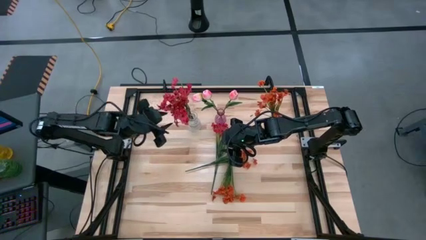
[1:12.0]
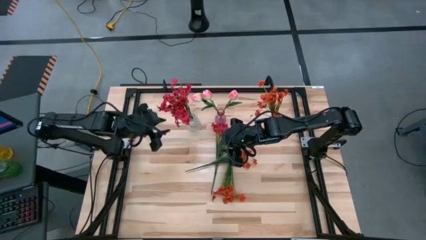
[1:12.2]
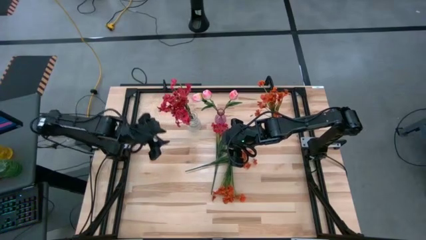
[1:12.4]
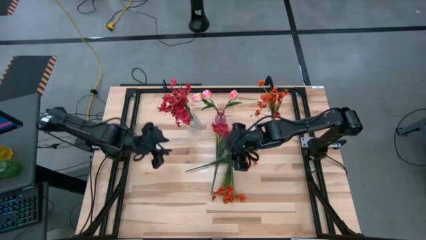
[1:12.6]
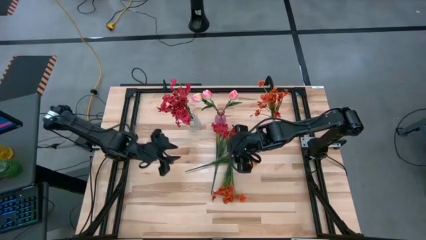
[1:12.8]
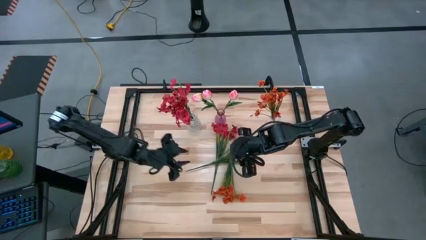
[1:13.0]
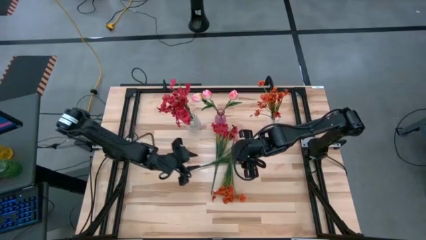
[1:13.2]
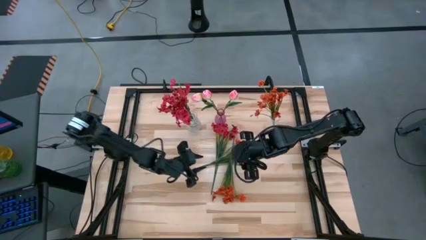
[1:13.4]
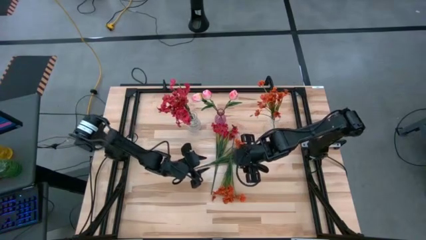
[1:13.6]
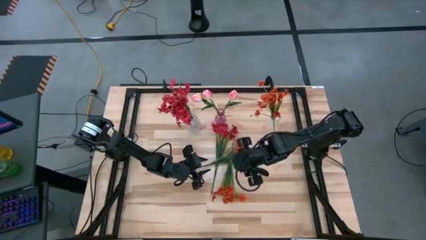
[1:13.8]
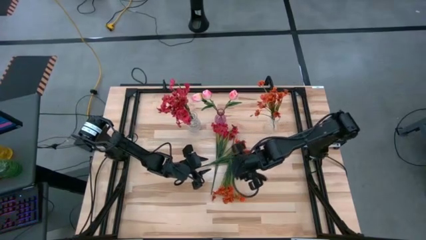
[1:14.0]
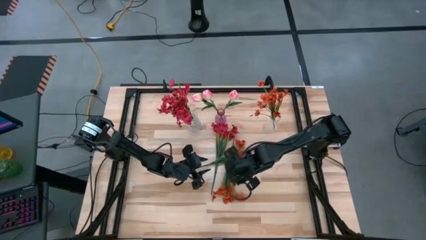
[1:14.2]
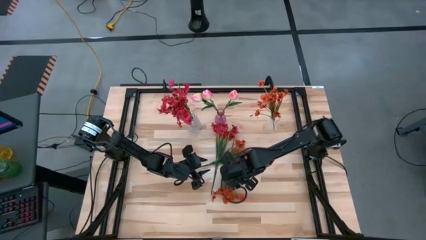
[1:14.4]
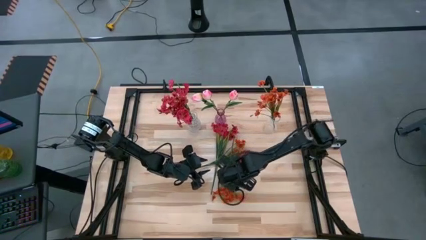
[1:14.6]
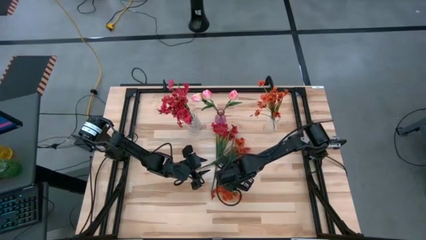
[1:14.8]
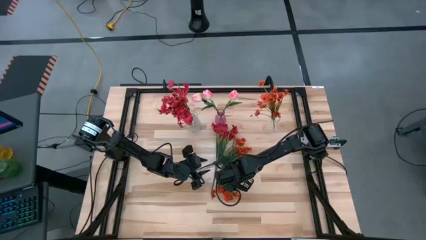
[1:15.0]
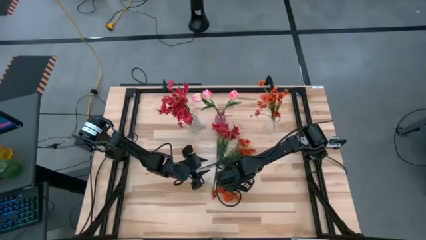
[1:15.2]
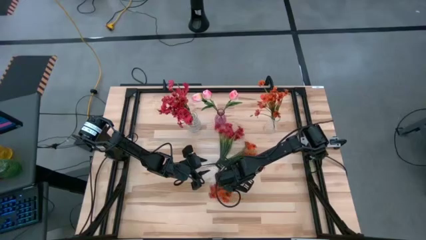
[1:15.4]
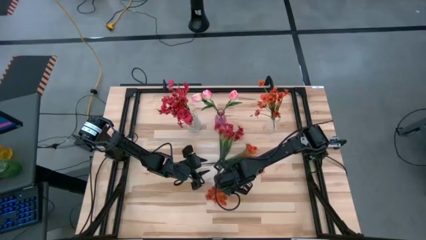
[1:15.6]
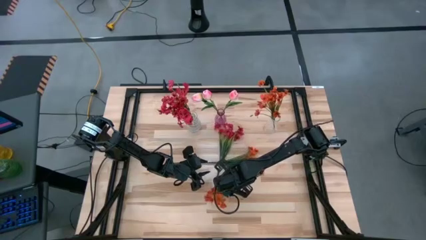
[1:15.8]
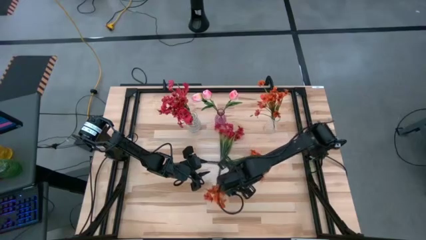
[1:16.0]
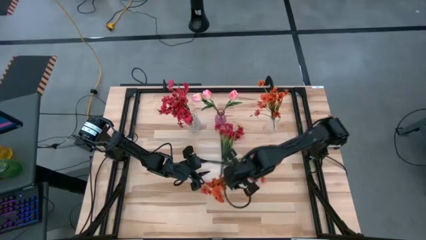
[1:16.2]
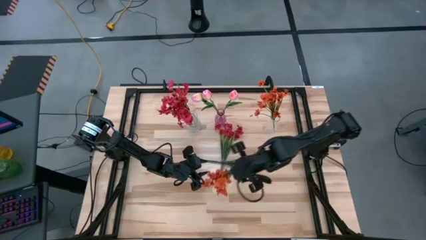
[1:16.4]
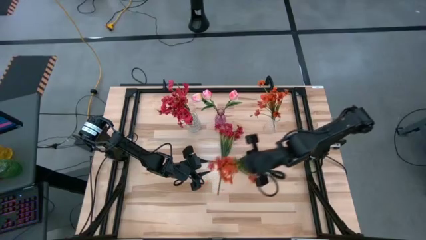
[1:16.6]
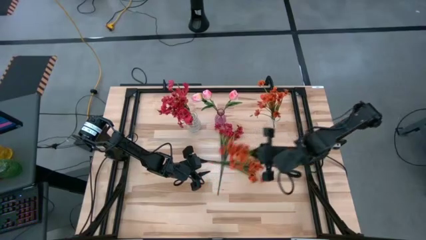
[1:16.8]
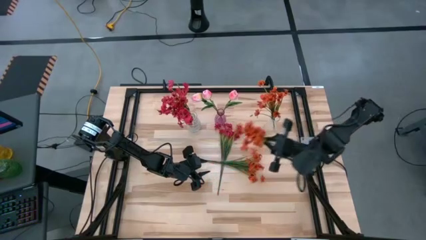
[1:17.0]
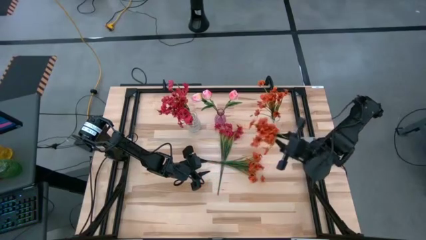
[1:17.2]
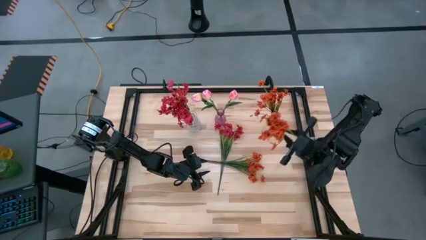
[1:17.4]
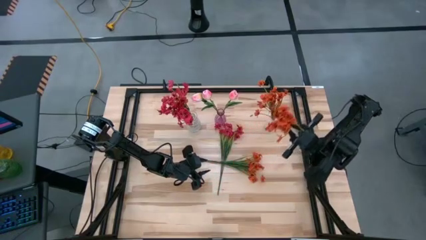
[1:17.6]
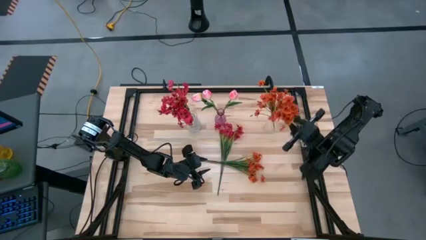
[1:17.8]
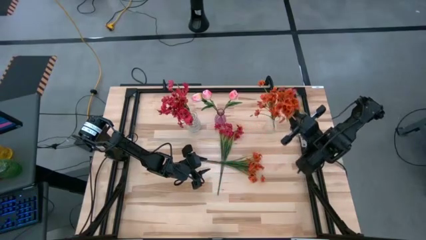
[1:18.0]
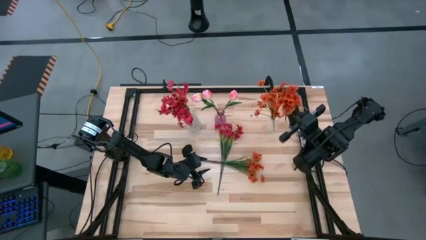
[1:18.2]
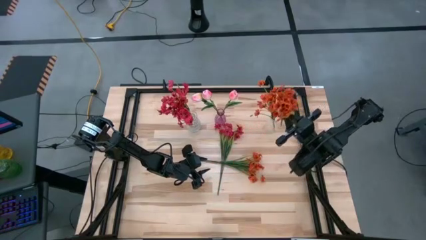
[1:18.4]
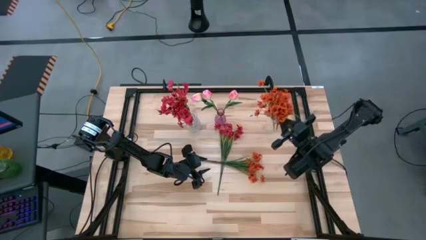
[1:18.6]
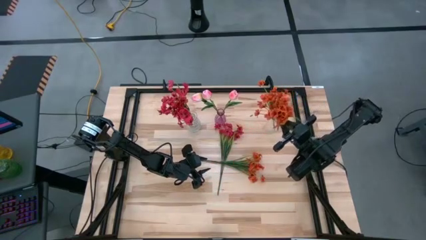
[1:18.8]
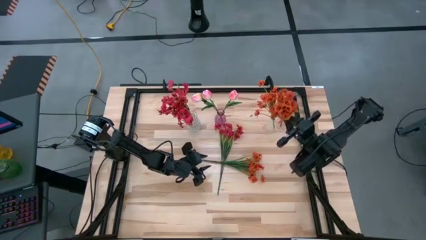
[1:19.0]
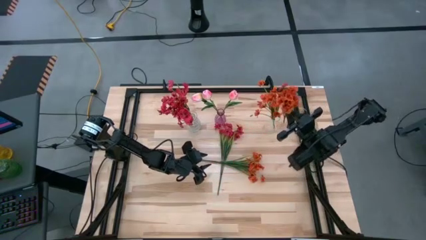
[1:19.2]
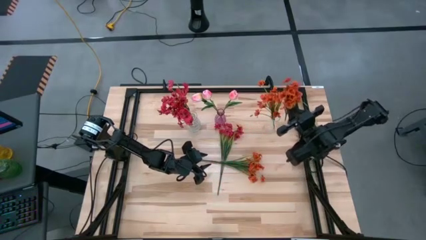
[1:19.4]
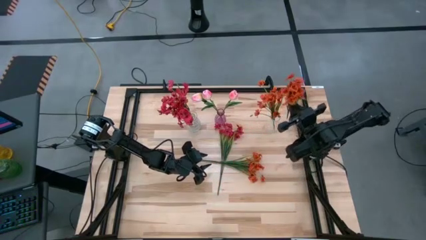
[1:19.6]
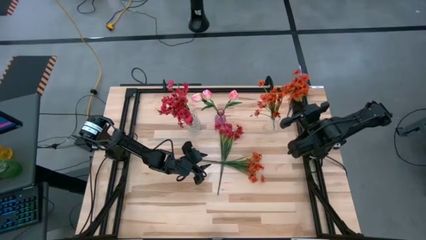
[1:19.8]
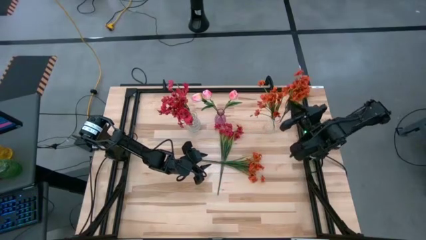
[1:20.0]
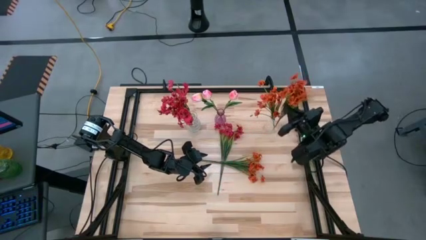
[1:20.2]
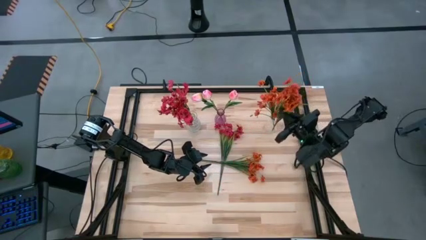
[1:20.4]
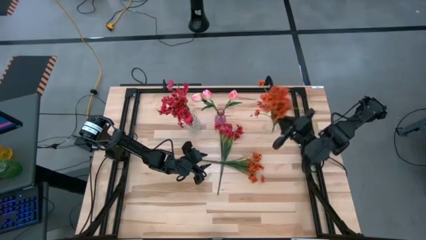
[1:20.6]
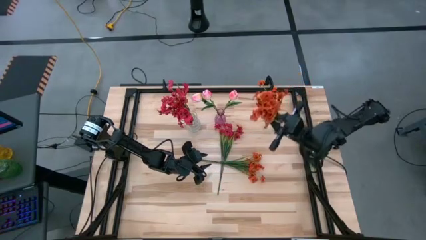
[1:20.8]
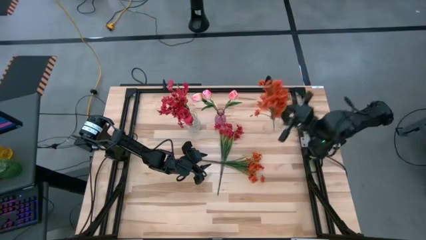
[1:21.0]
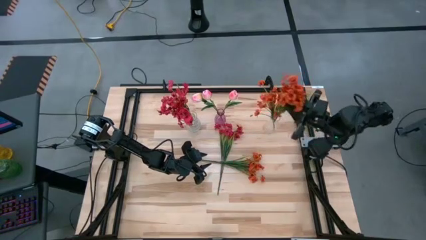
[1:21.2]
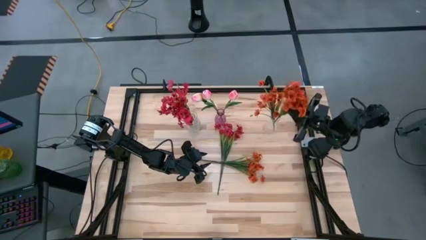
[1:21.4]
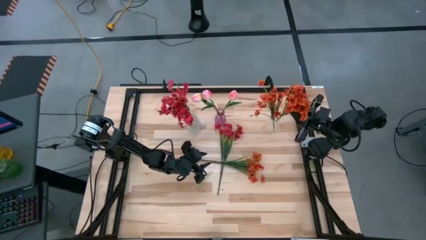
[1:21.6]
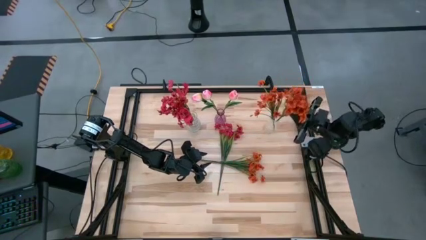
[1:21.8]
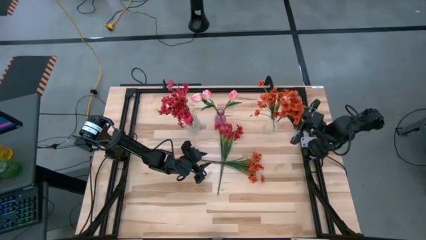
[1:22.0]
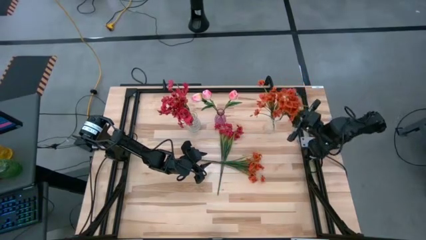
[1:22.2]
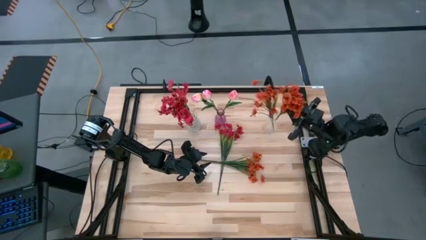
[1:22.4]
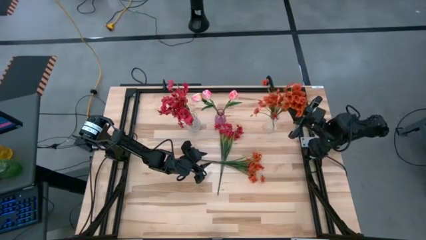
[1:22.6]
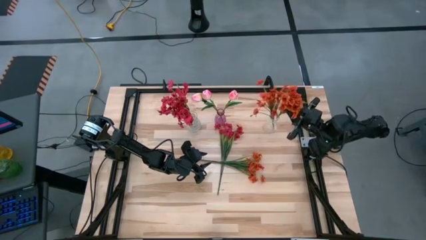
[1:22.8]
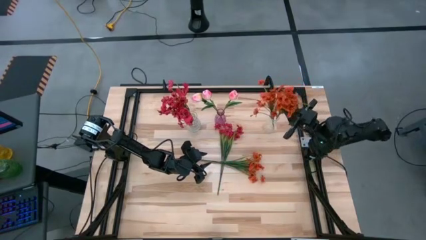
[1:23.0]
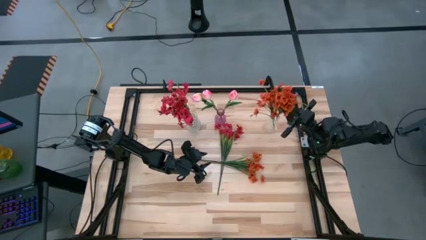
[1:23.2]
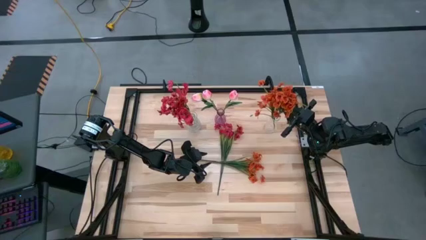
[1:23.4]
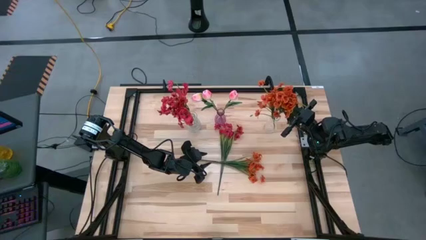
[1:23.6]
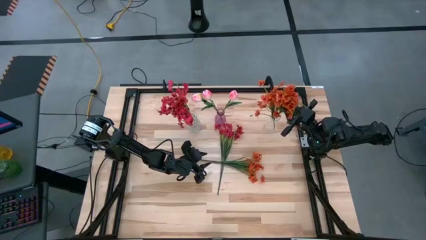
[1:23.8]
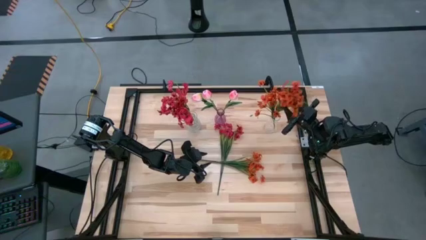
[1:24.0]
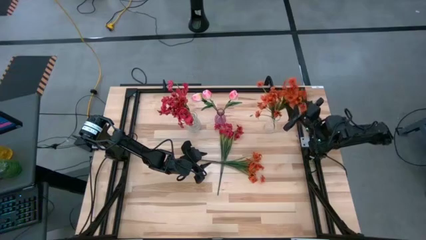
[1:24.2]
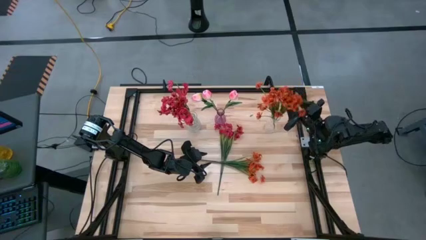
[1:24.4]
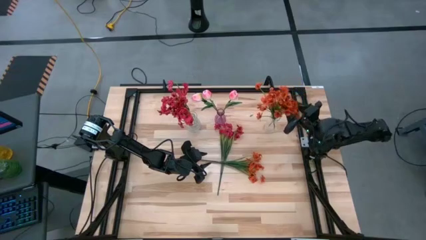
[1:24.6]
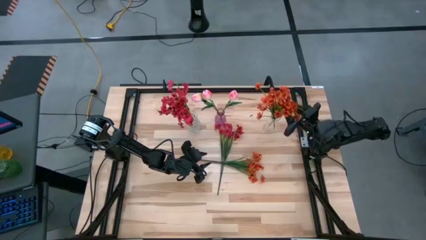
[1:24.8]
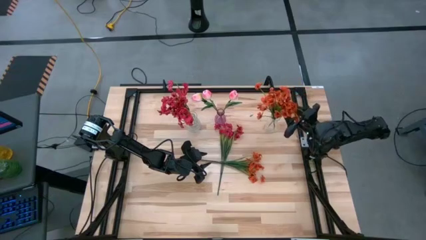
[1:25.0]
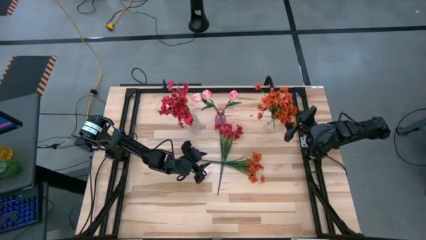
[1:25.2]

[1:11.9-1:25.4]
Task: Sort flowers into vase by color
Put the bottom orange flowers into the right transparent vase

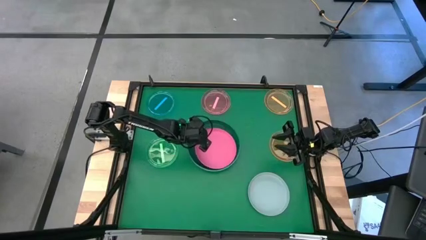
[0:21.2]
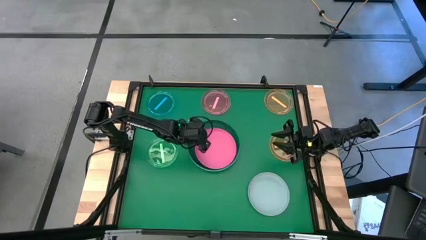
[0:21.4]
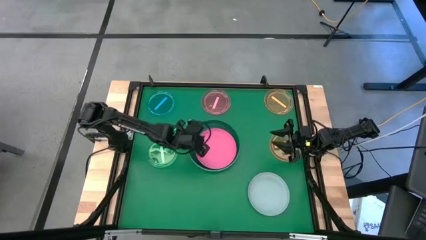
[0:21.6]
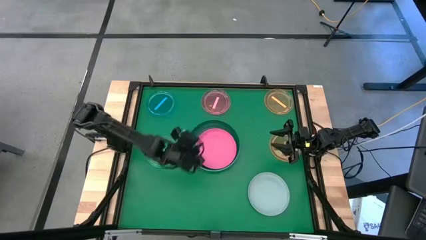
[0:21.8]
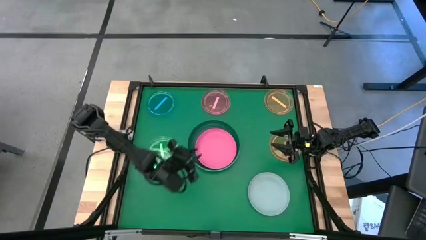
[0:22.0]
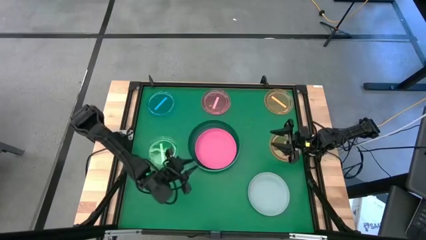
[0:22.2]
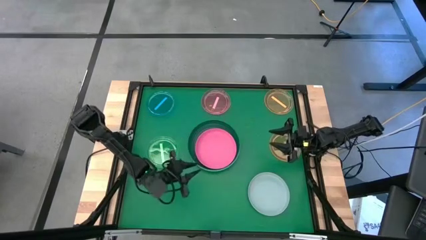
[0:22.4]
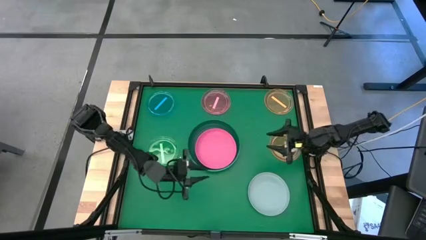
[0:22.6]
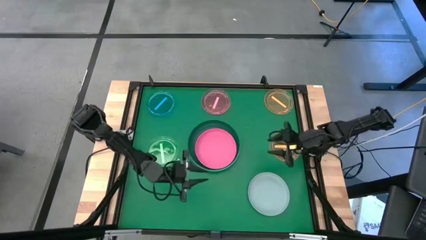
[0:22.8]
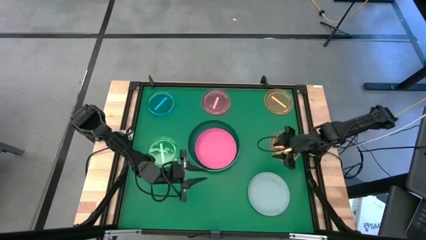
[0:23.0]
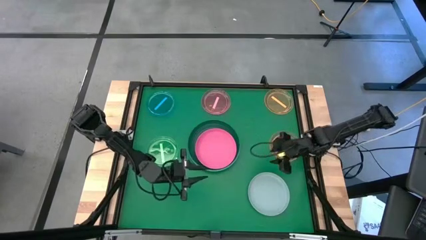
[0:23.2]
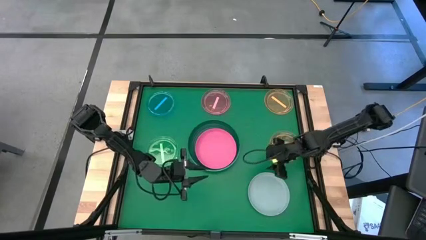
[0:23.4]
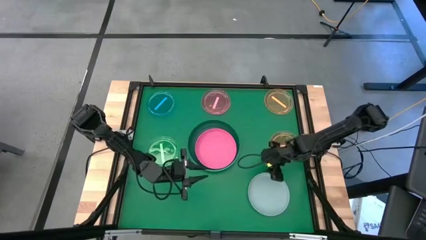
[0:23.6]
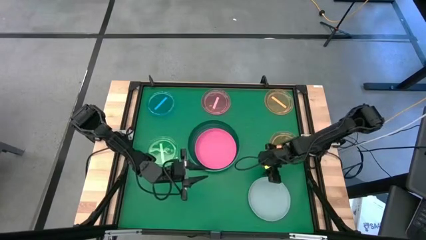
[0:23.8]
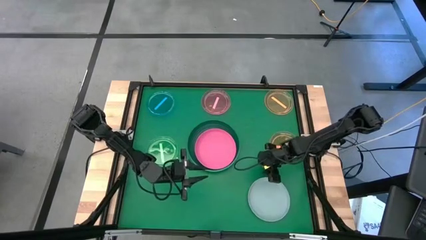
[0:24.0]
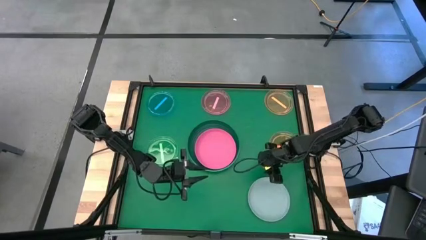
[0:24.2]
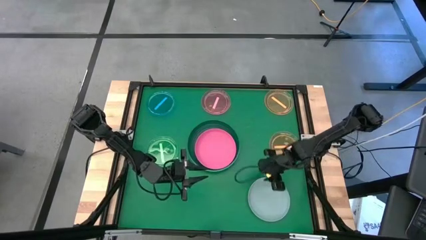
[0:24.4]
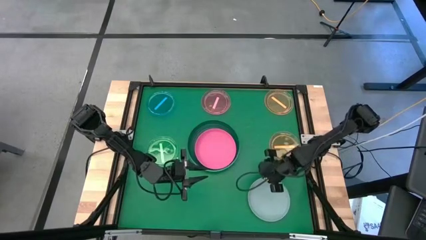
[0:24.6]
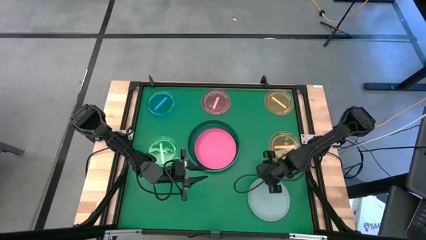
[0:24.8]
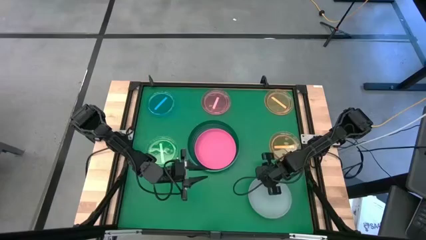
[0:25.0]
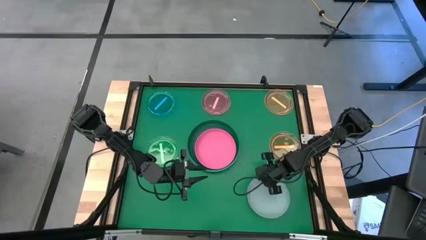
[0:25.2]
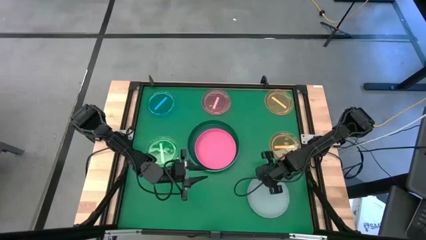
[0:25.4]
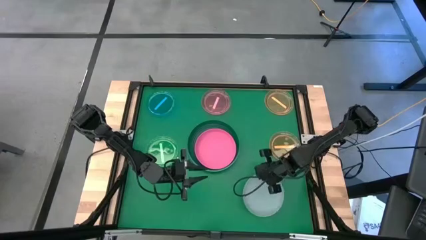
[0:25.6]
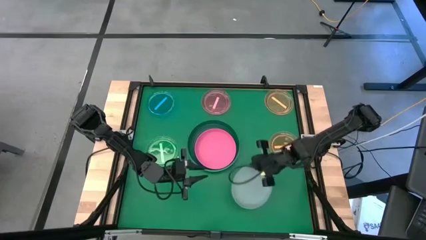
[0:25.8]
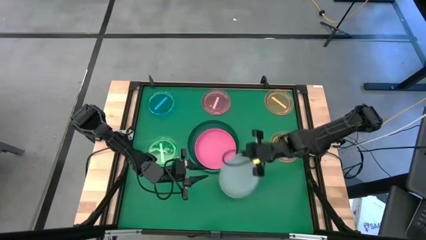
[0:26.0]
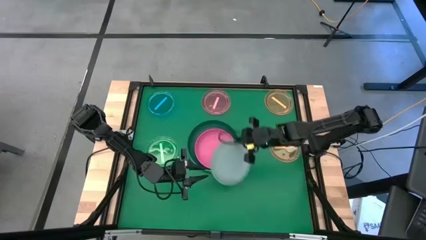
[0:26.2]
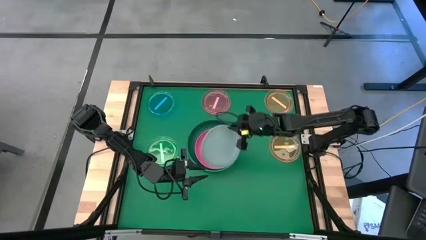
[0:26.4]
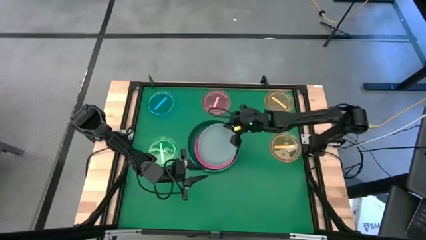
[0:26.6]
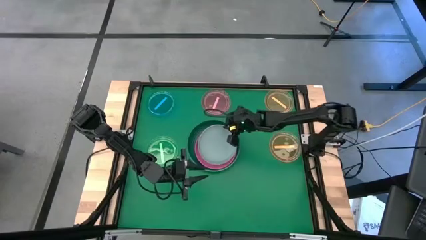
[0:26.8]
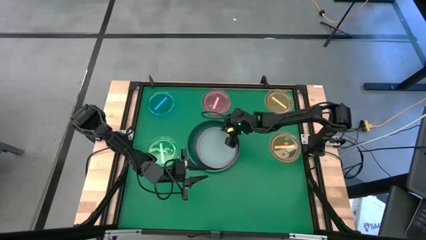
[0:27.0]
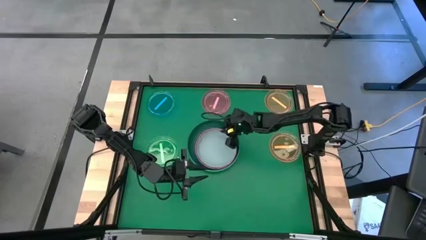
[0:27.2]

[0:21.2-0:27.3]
Task: Stack plastic plates
Stack the gray plate on top of the the pink plate
